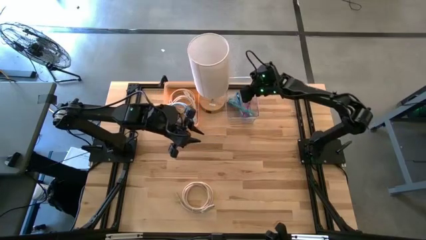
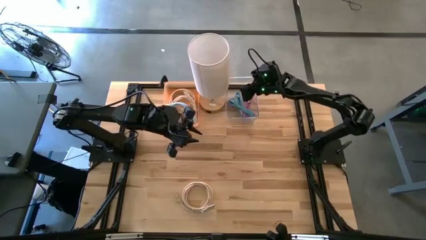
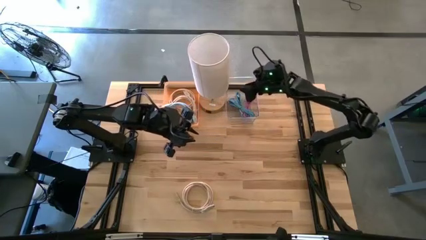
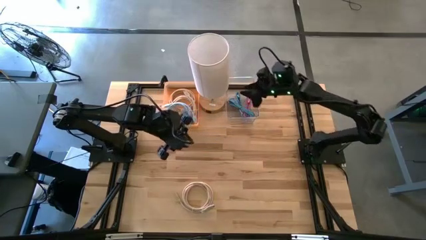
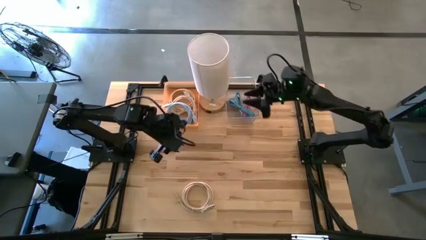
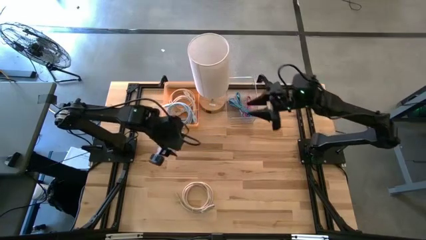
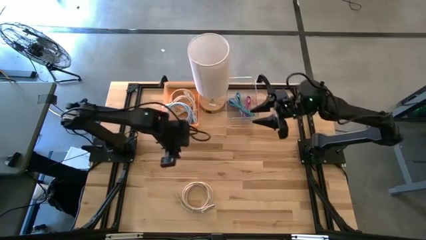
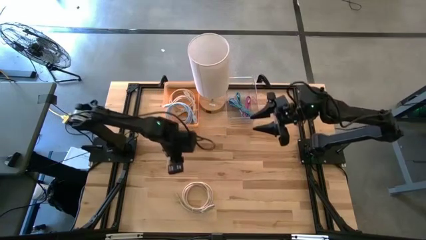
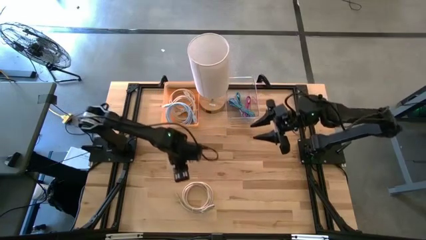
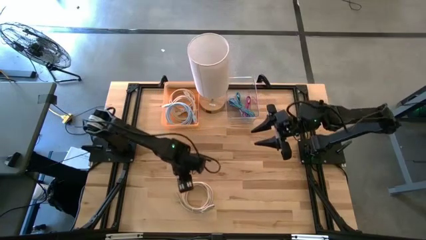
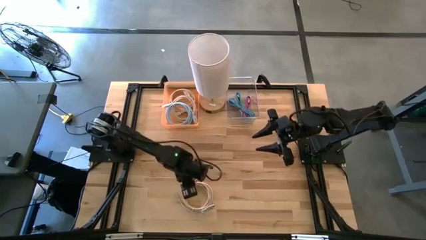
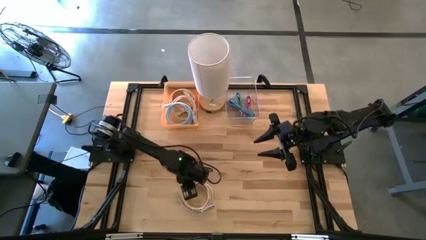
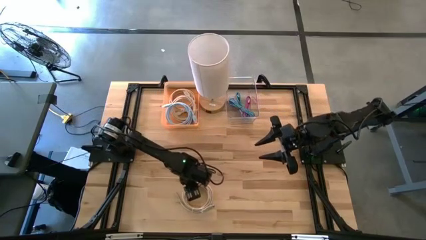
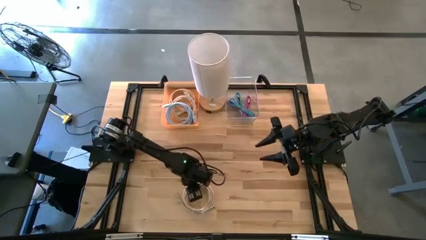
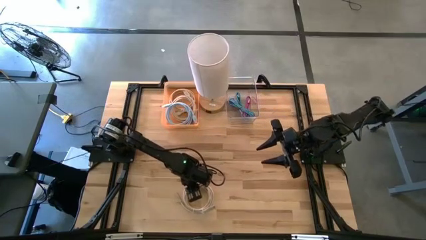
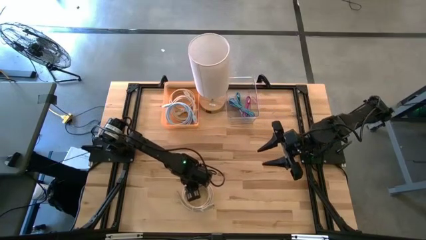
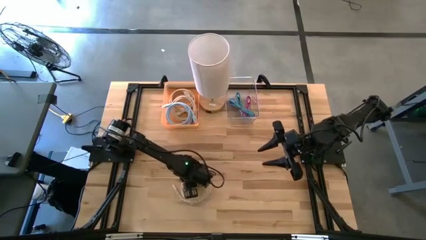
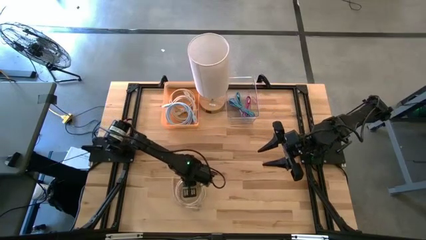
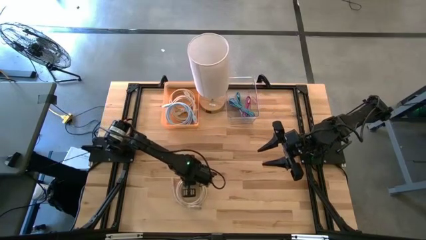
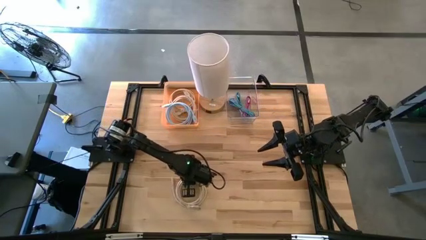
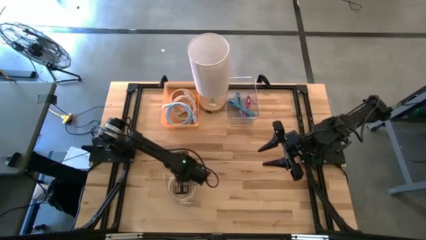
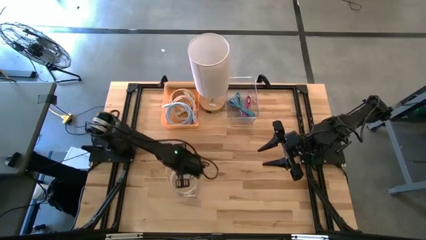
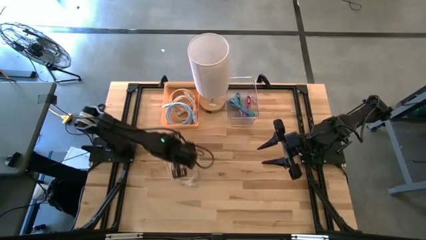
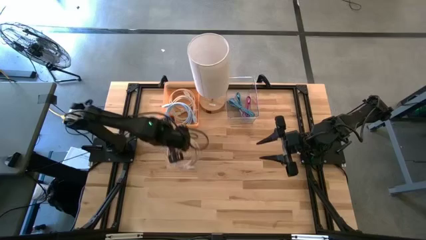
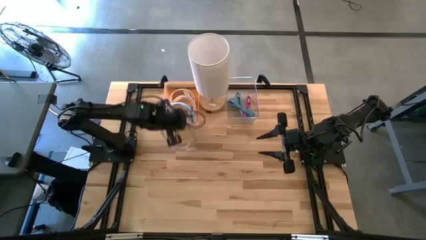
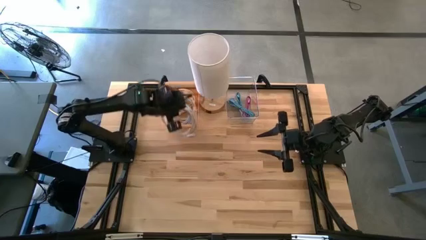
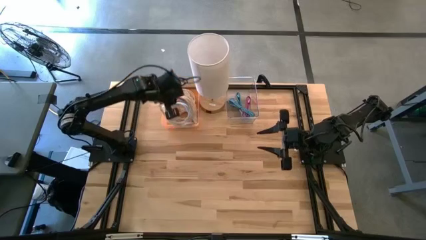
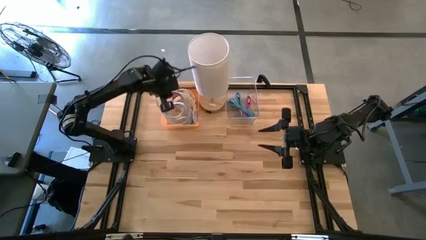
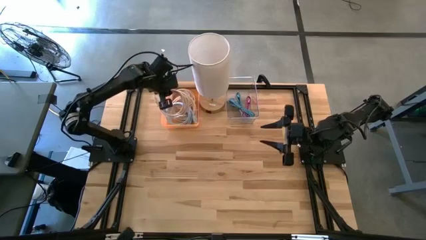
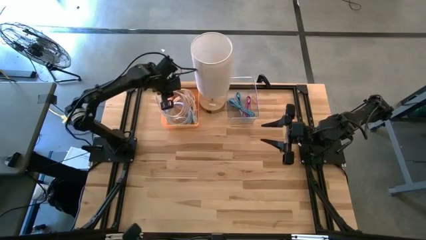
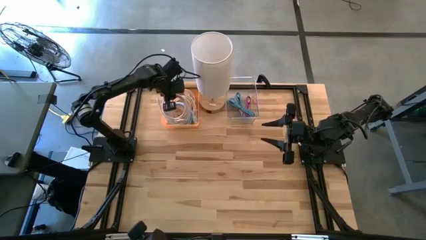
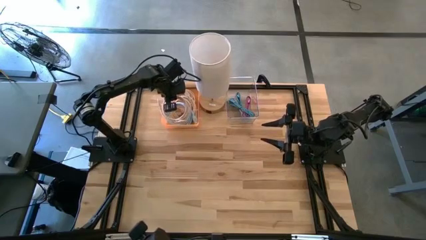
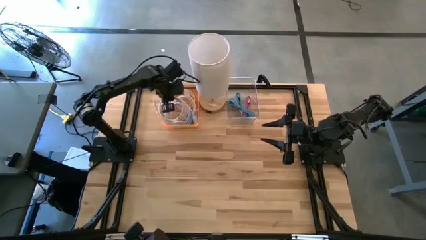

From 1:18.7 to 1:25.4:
Task: Pick & Place USB Port
Put the white usb cable into the orange bin

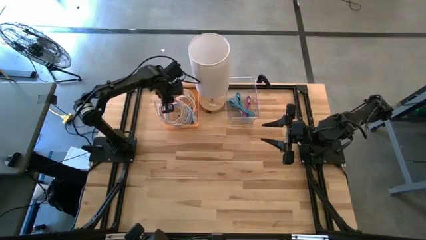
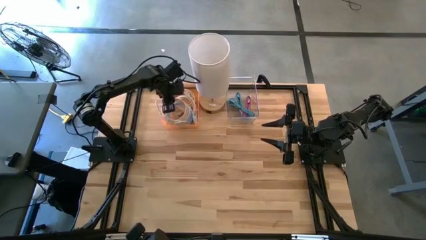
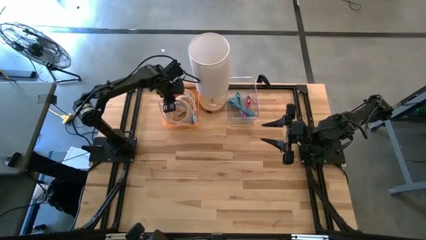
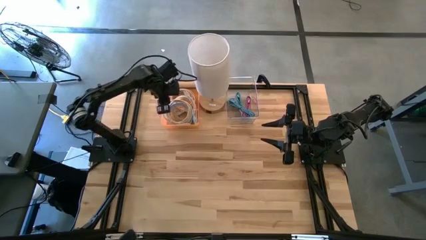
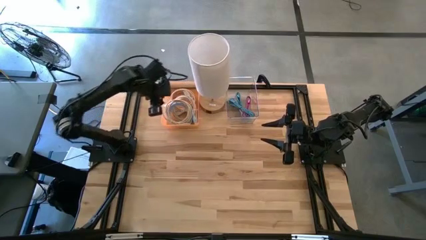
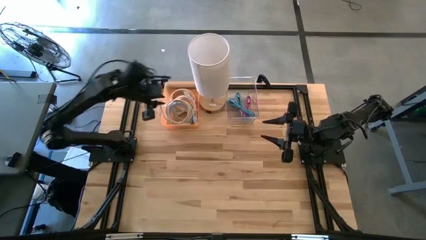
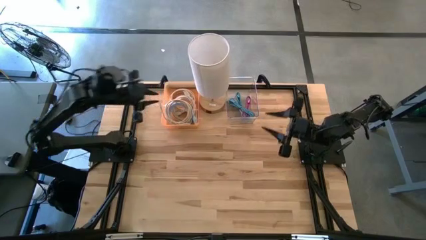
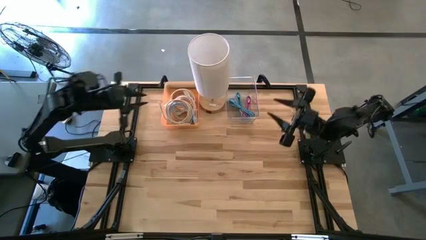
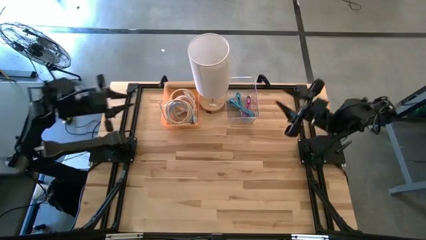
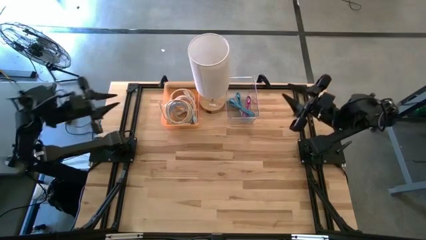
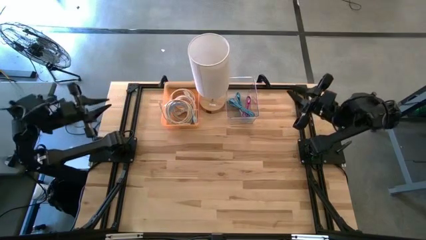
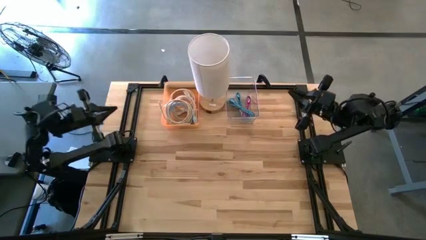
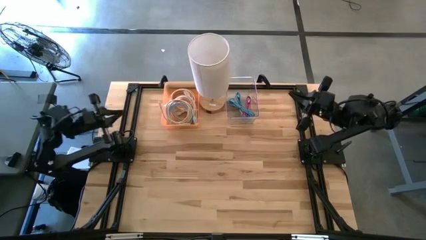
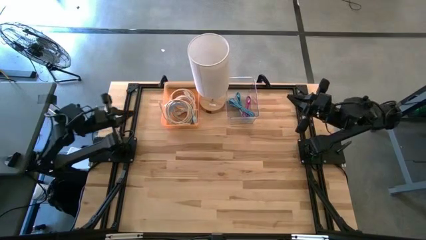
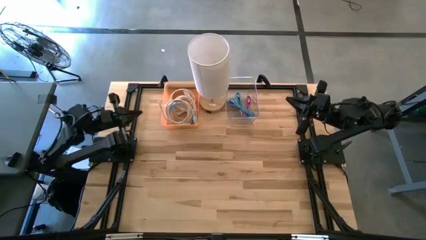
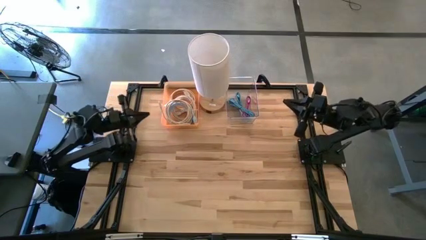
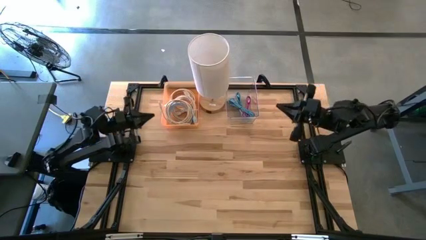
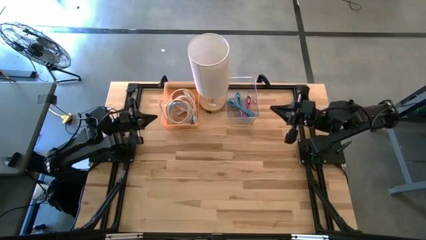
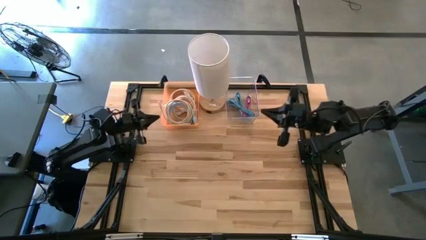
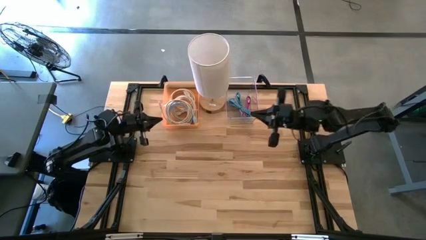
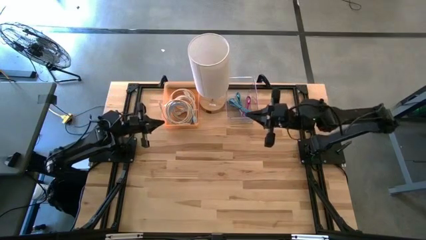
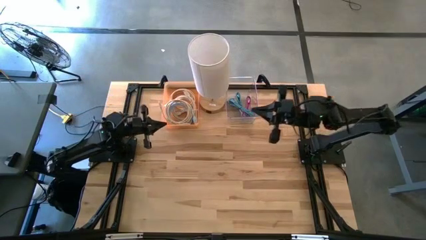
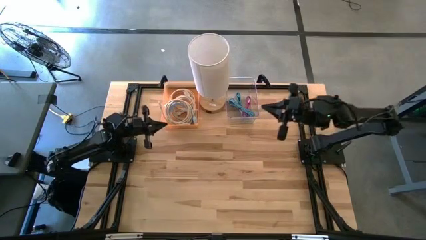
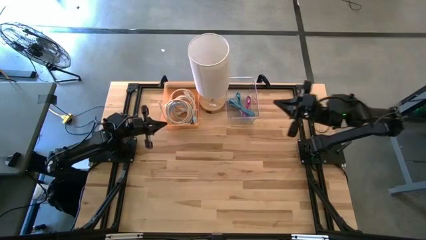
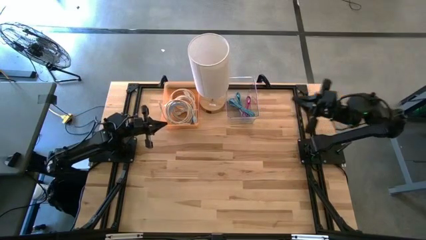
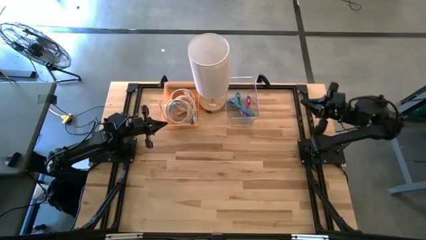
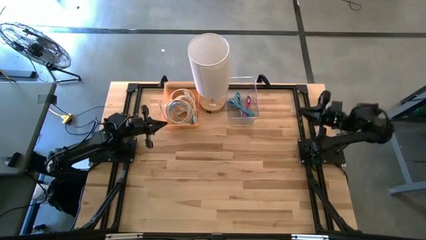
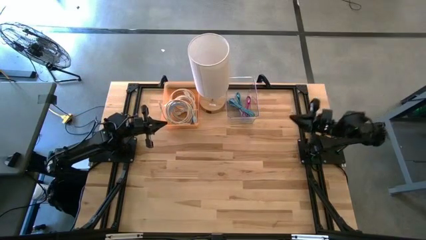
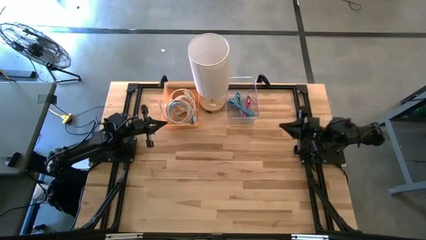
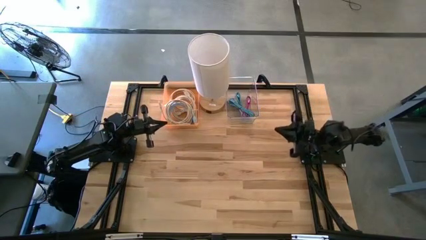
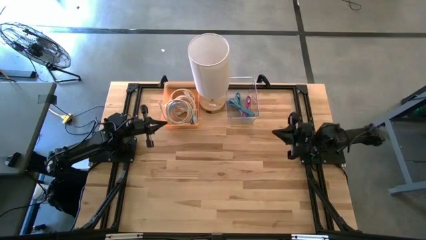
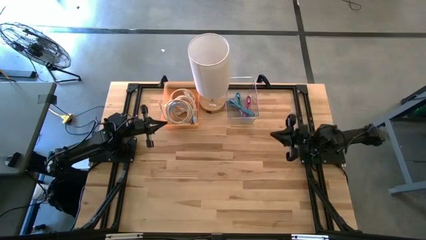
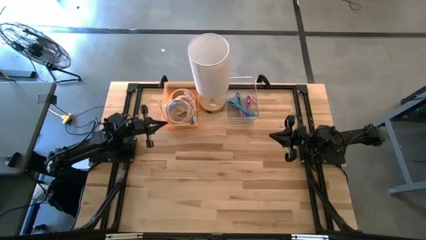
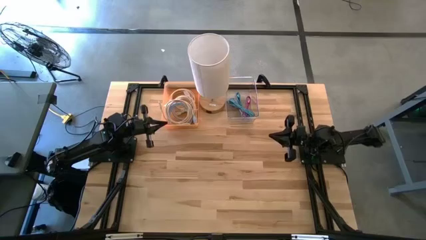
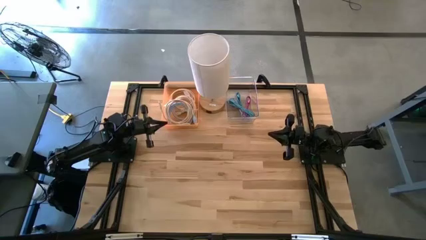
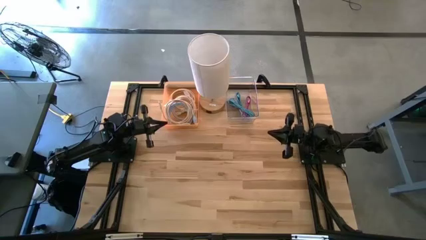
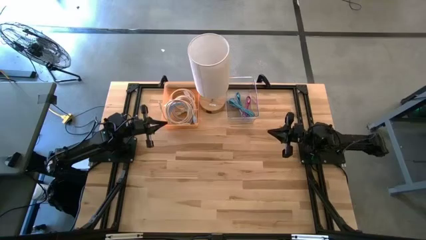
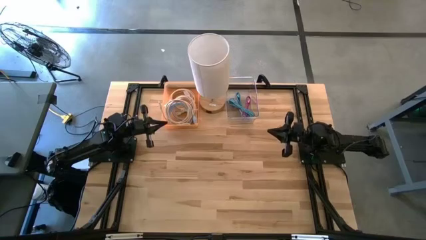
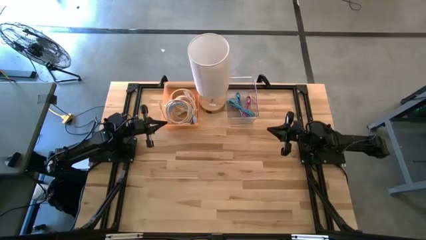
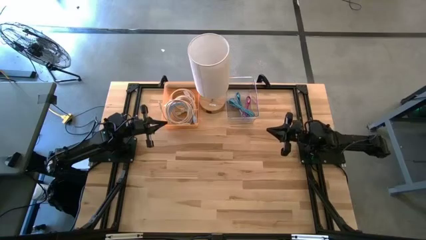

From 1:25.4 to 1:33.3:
Return to Home Position

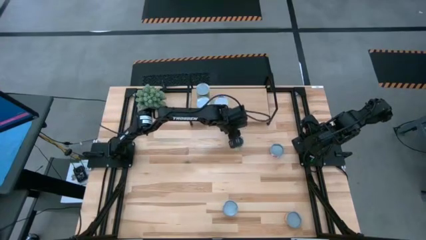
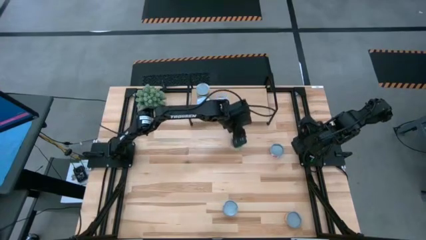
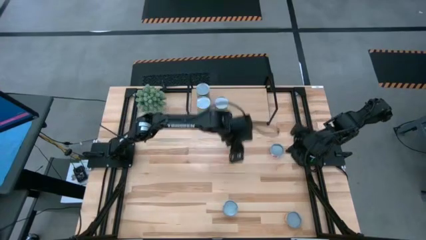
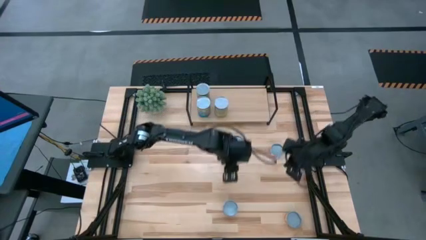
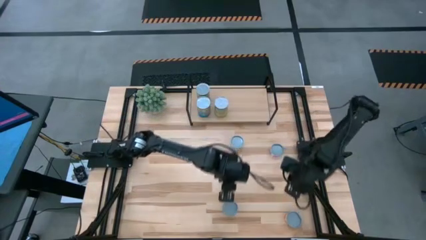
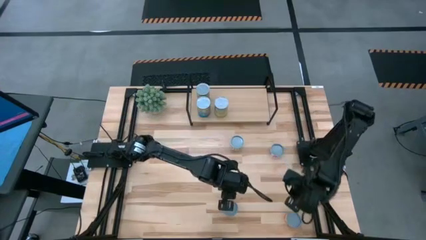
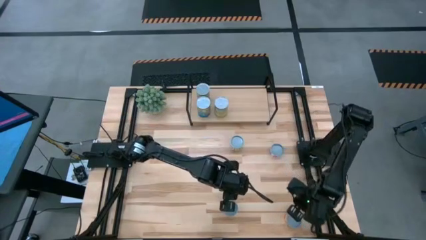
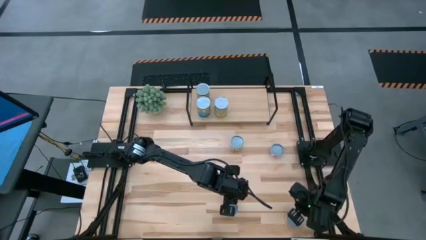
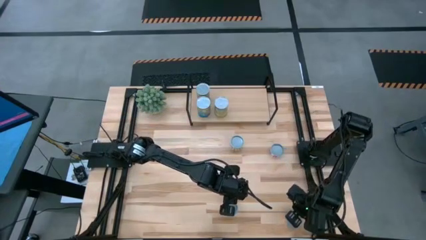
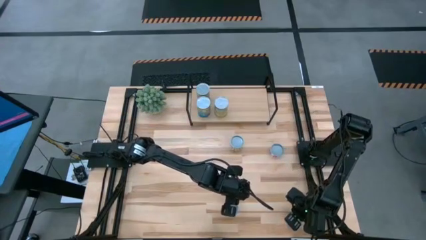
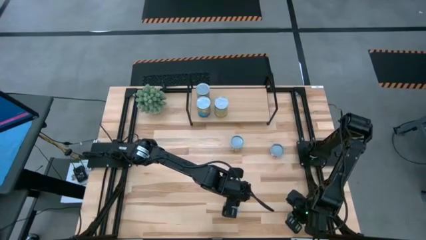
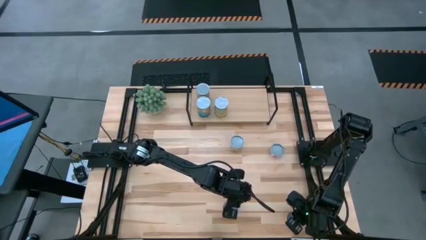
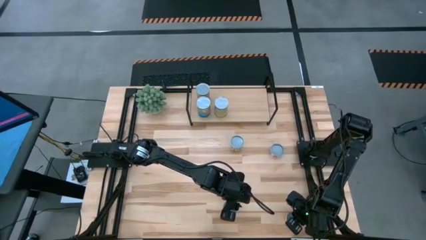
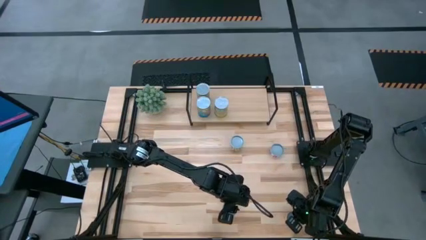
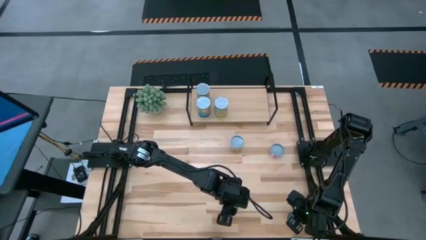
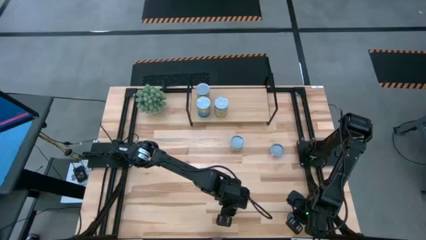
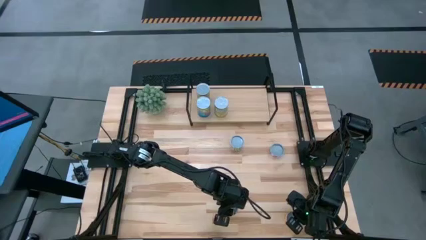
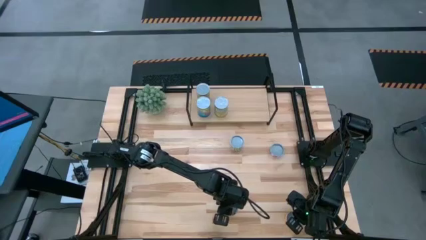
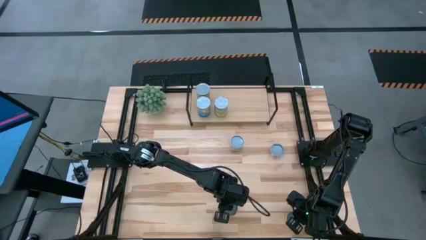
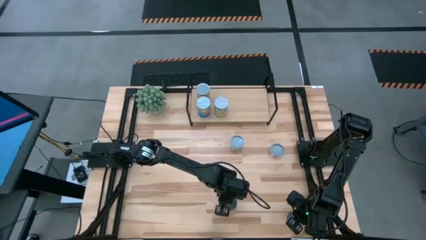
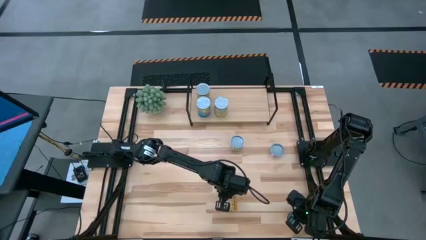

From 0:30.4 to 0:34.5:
Task: Pick and place cans onto a shelf
Move the canned black beans to the center of the table
